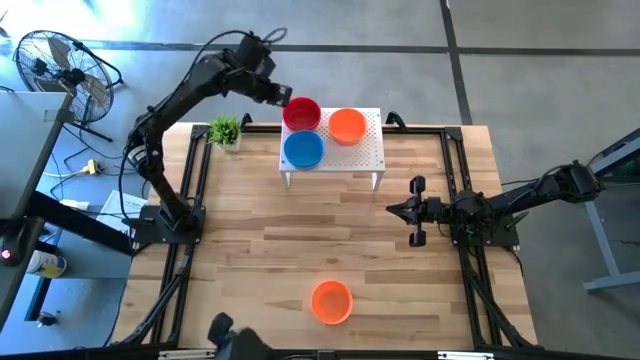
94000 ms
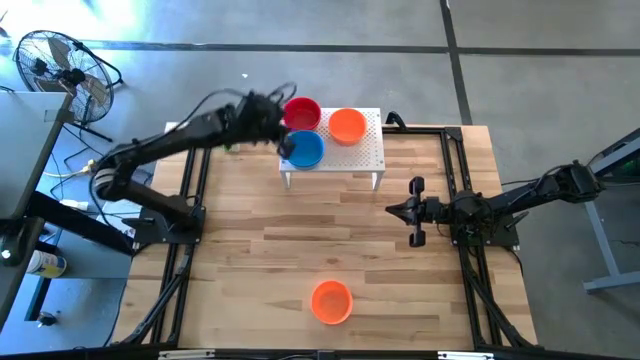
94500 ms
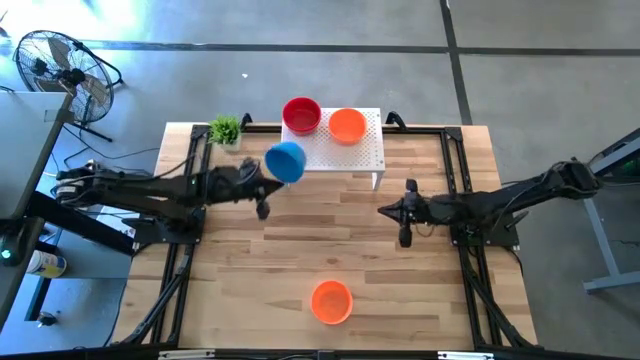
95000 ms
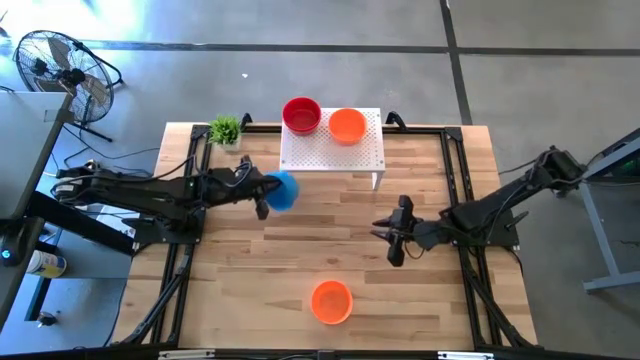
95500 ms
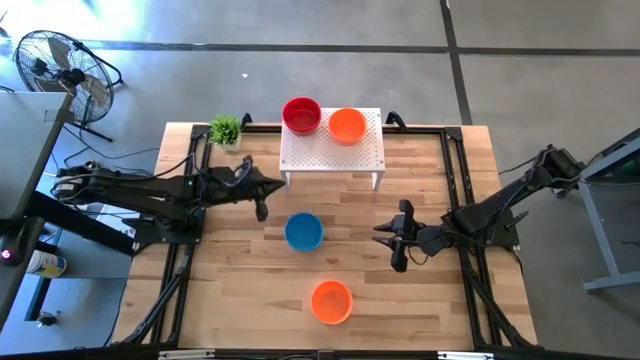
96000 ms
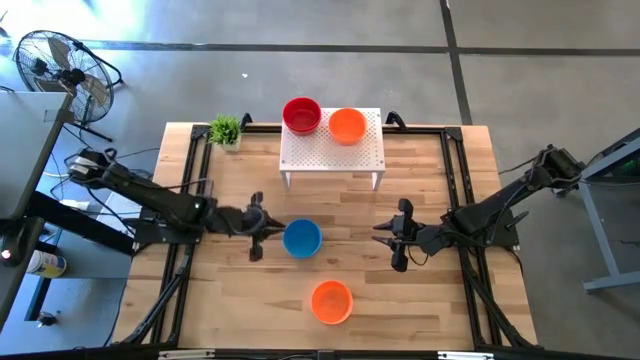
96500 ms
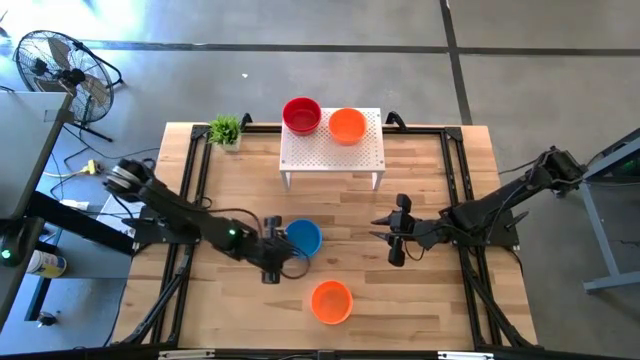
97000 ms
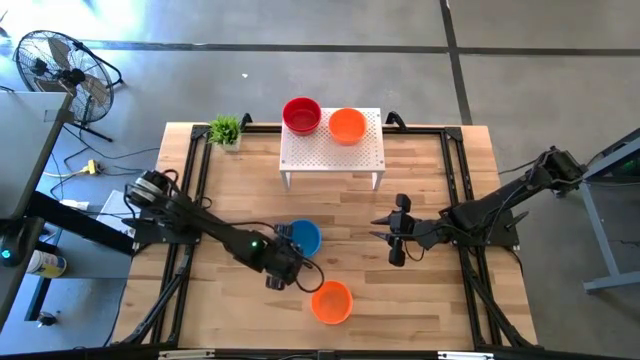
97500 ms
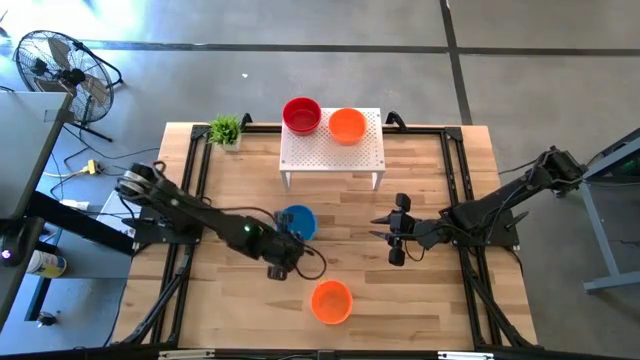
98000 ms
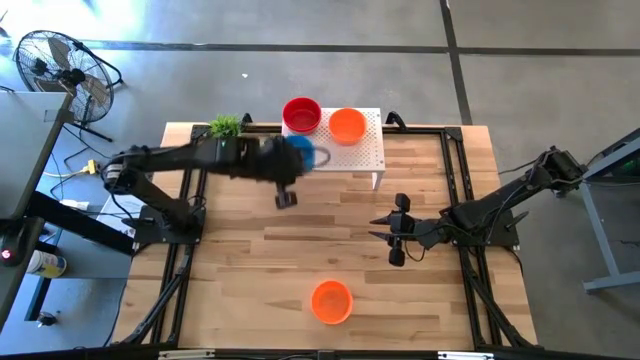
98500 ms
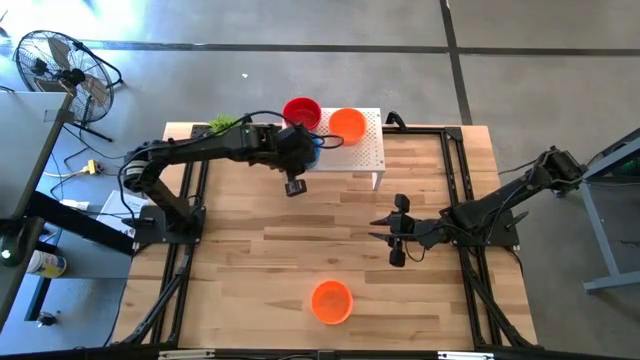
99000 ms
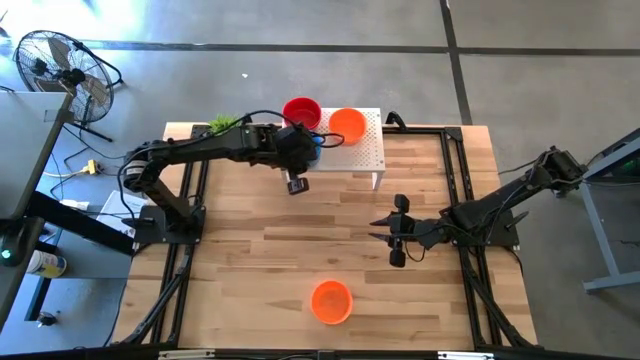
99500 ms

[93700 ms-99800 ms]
Task: Pick & Place Mini bowls
Put the stacked blue bowls on the shelf

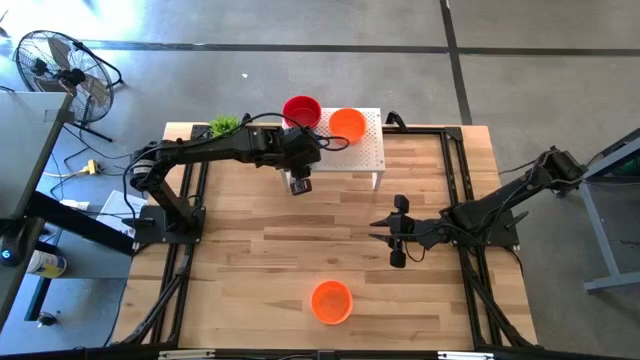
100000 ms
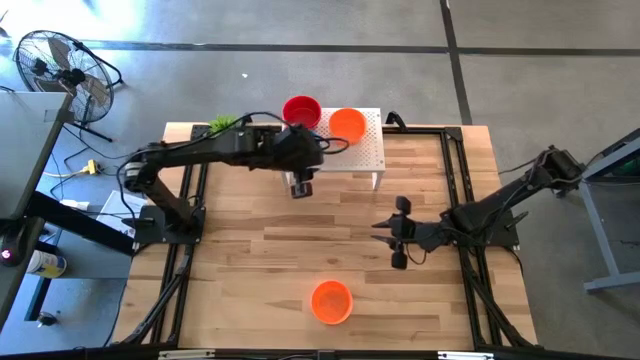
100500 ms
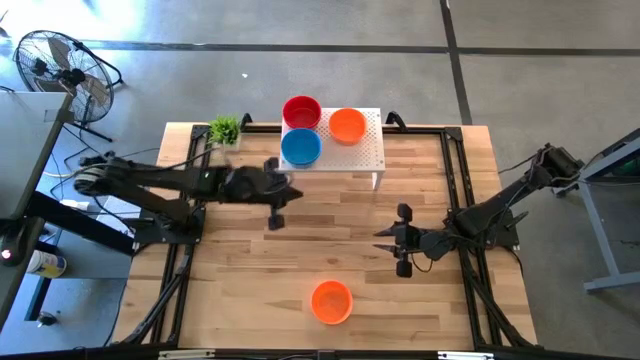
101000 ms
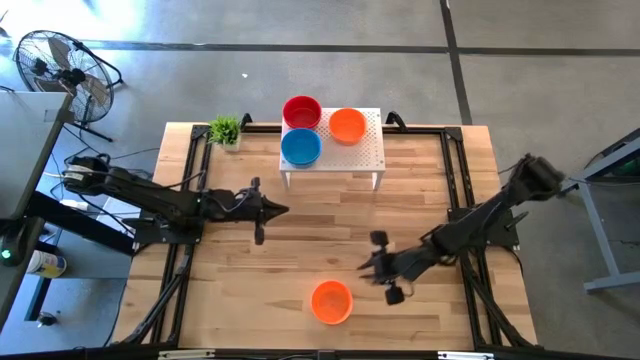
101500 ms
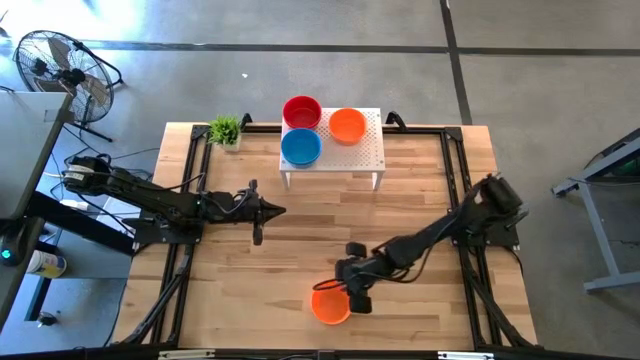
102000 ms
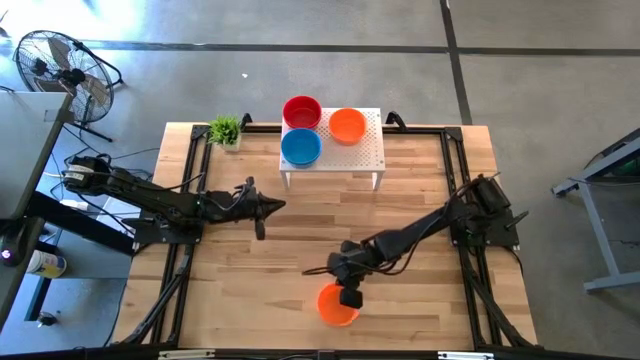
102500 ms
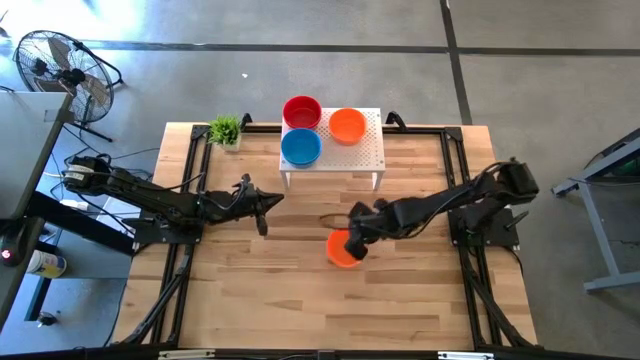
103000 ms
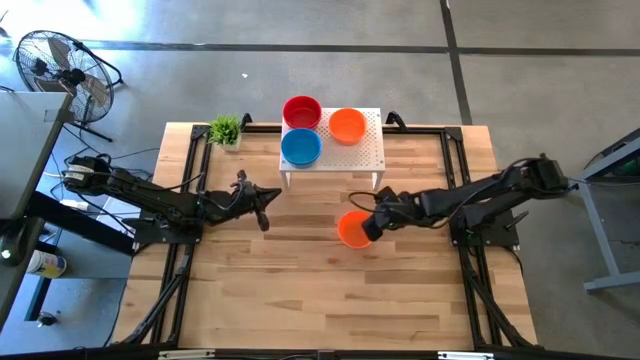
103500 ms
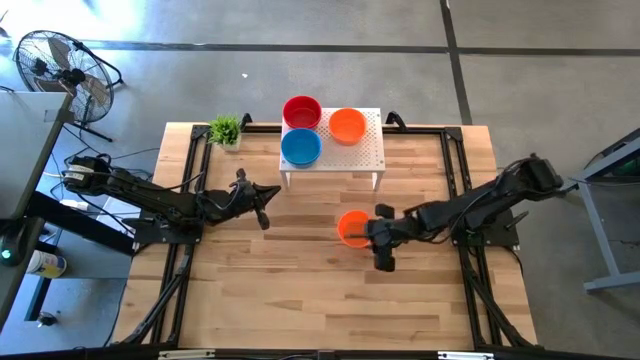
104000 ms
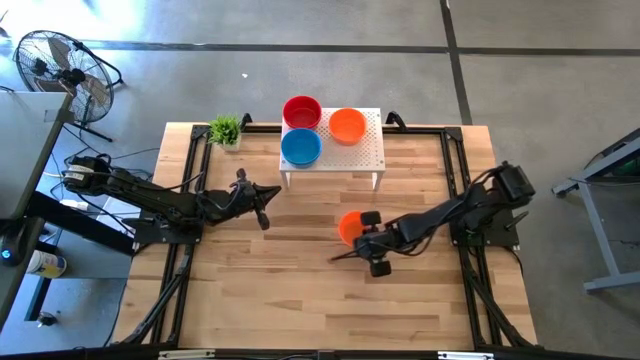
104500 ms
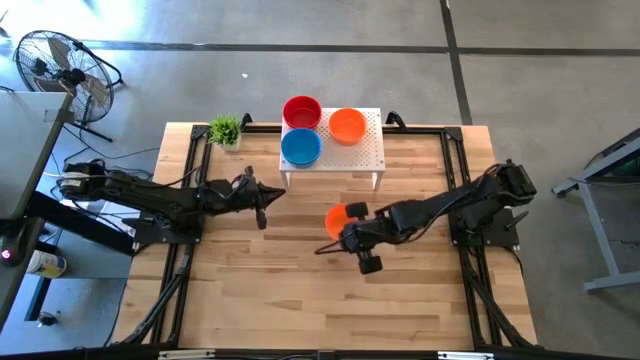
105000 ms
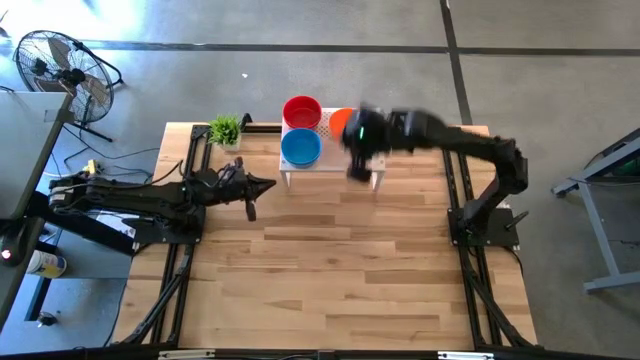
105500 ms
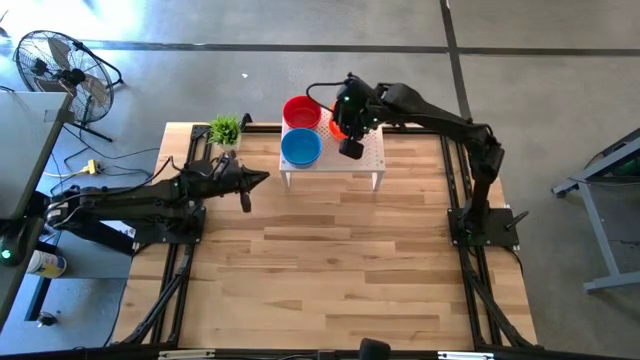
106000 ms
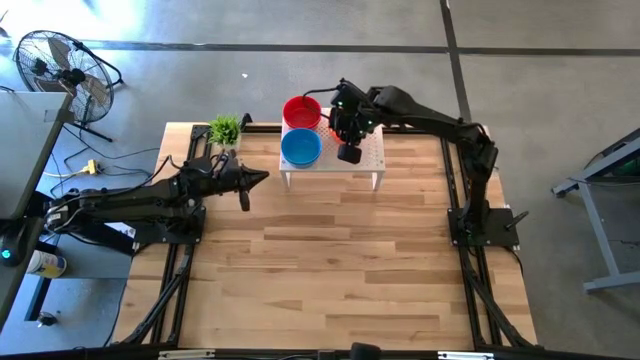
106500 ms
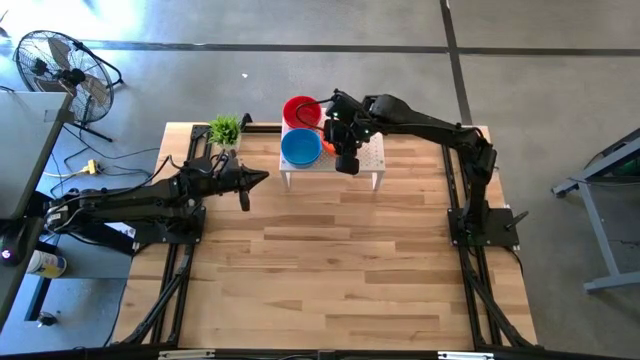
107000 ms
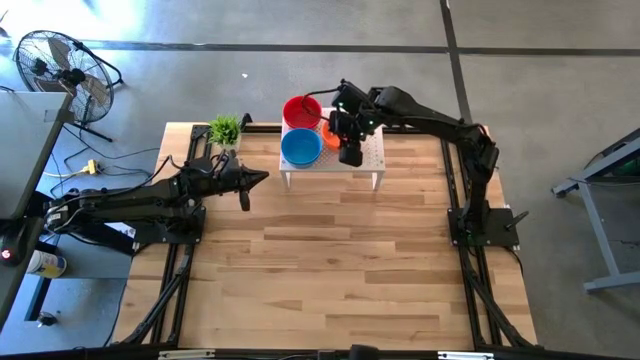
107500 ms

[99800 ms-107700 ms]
Stack the orange bowl on top of the orange bowls on the shelf

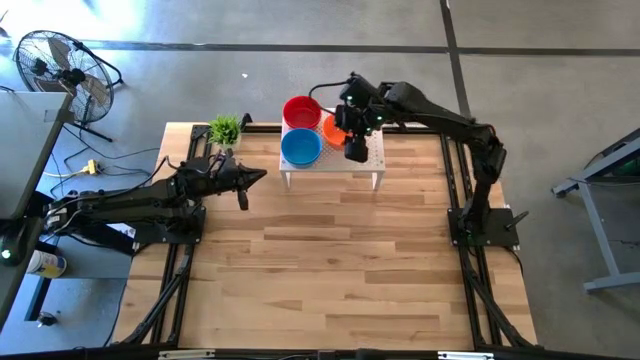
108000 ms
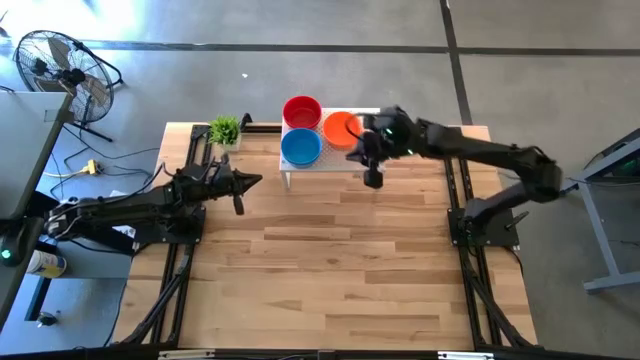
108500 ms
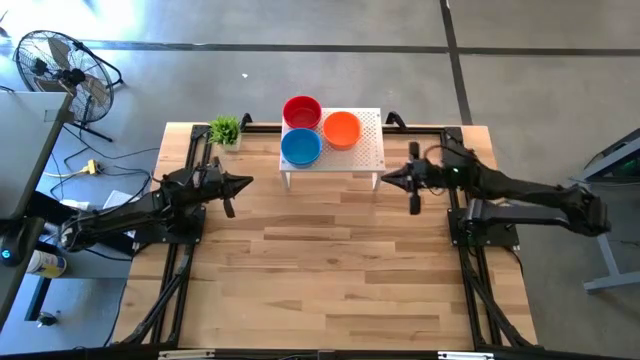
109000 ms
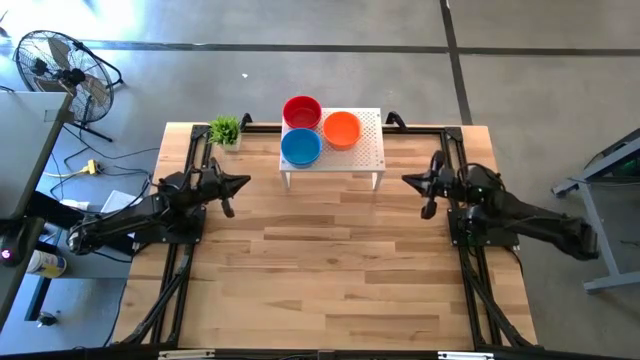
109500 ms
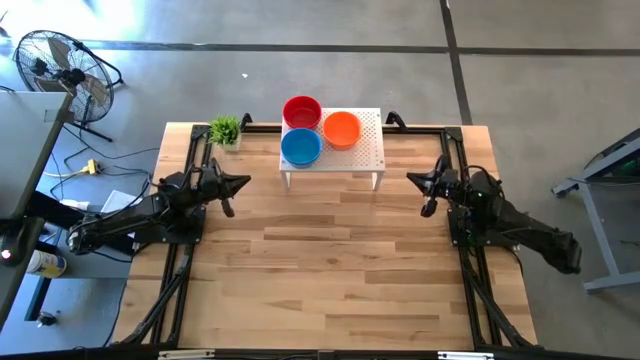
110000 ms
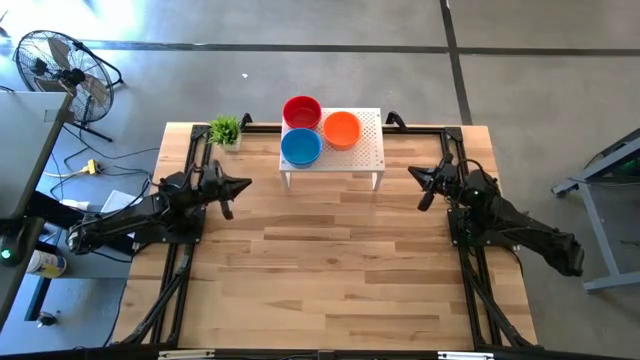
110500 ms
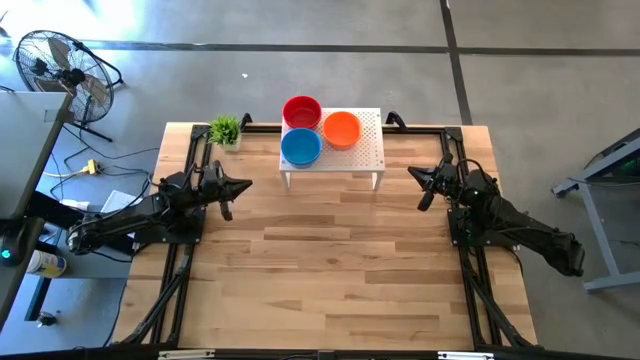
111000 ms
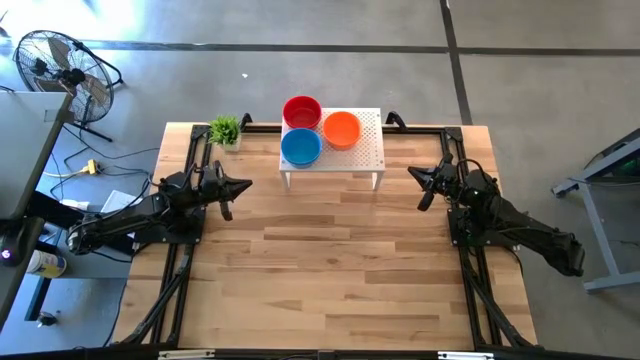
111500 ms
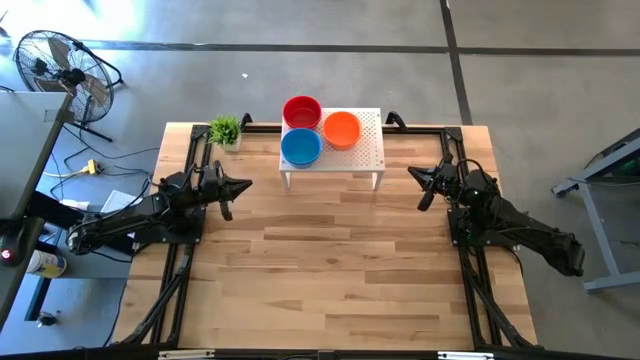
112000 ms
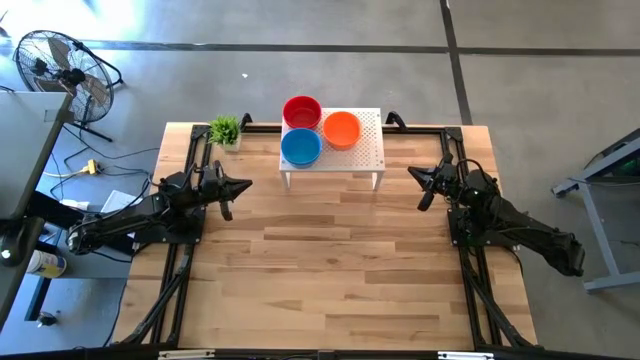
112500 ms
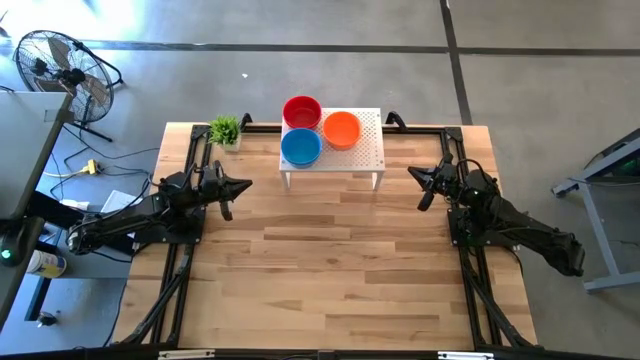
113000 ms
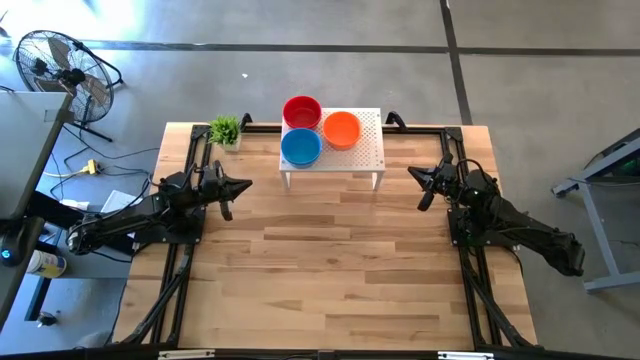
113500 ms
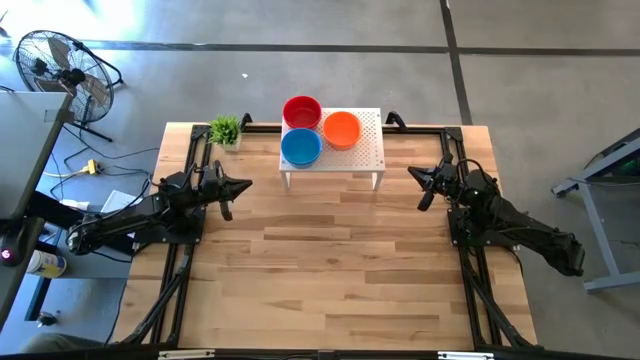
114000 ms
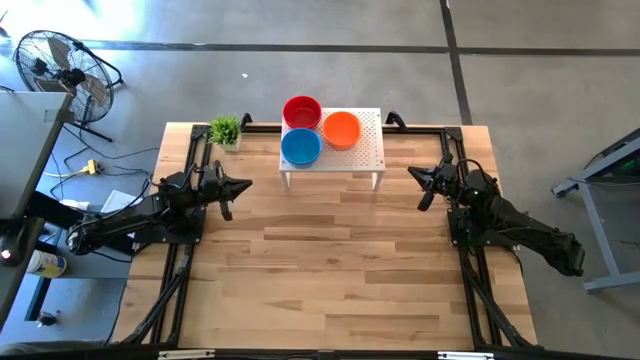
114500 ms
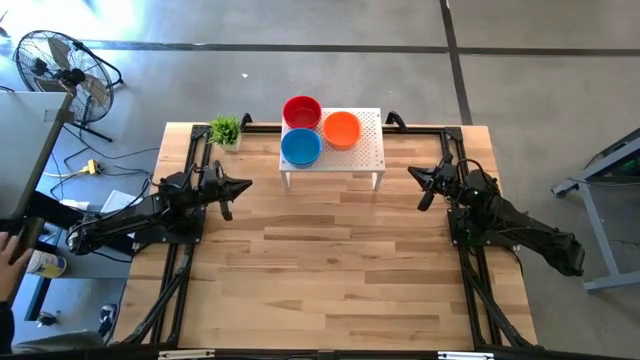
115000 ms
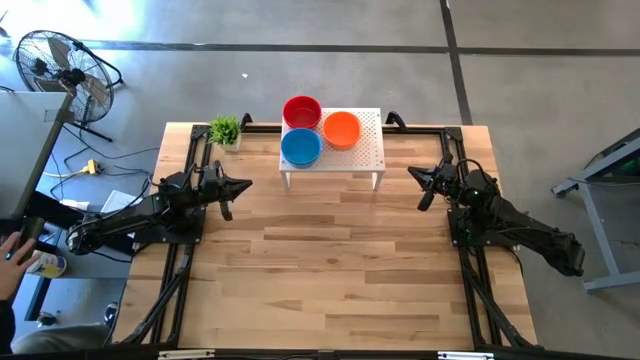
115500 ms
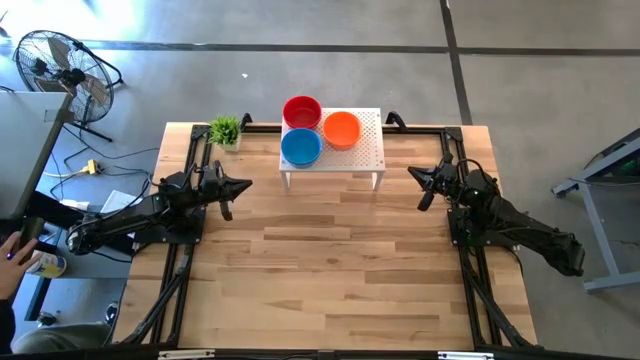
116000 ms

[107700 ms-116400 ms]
Return to Home Position
